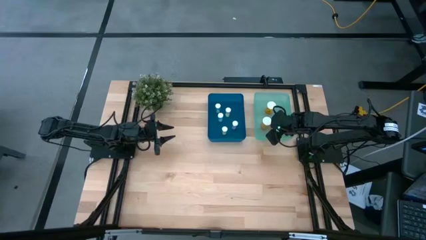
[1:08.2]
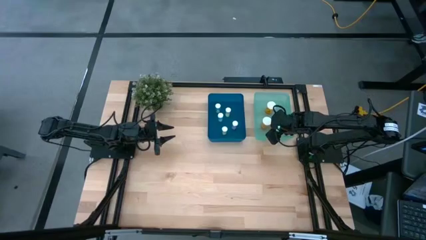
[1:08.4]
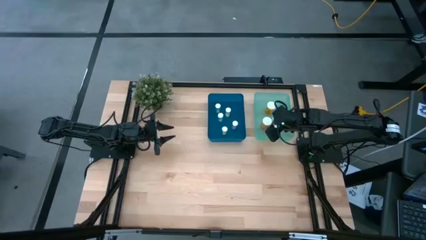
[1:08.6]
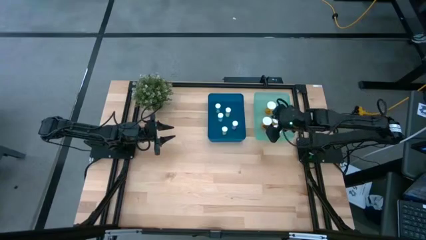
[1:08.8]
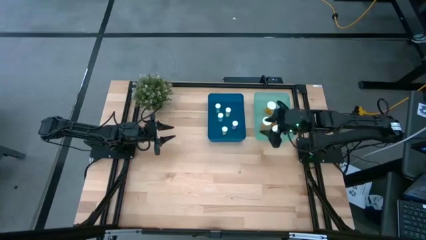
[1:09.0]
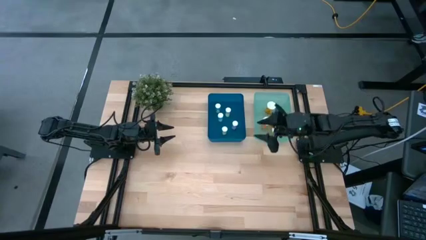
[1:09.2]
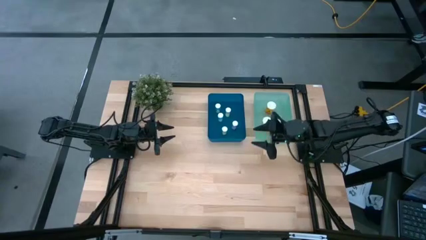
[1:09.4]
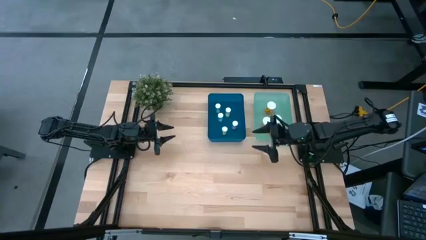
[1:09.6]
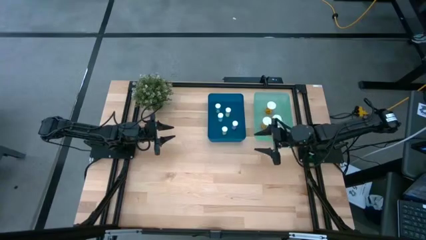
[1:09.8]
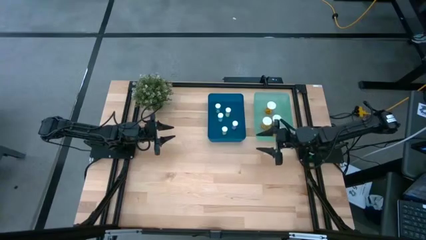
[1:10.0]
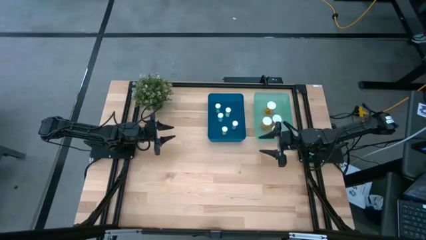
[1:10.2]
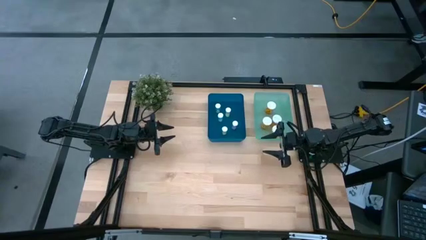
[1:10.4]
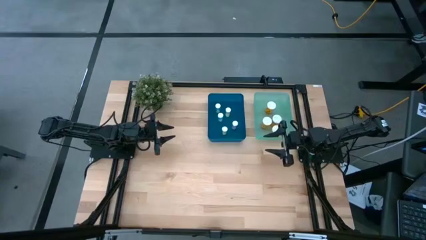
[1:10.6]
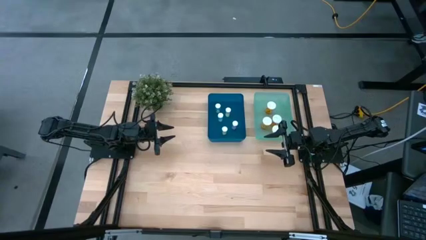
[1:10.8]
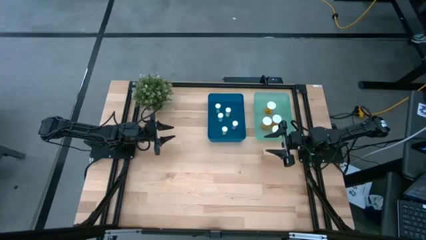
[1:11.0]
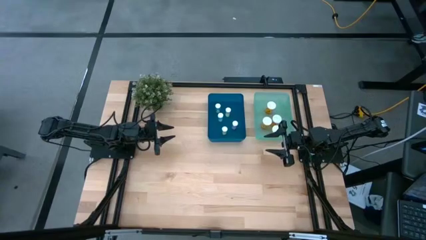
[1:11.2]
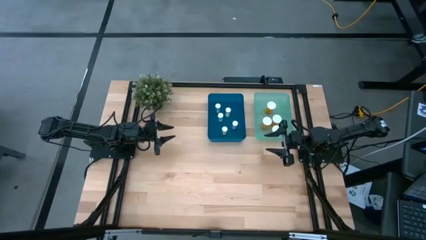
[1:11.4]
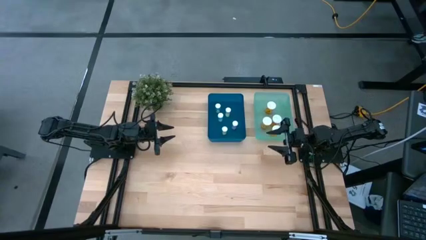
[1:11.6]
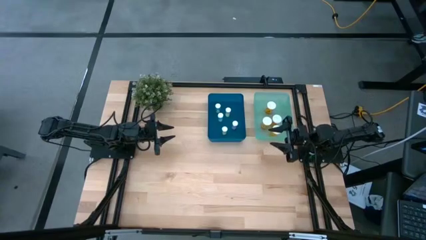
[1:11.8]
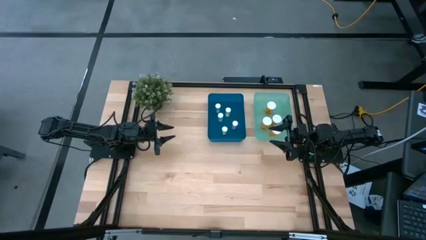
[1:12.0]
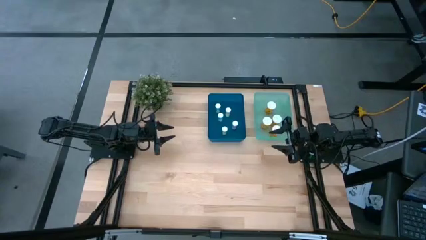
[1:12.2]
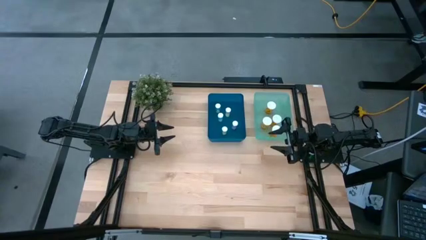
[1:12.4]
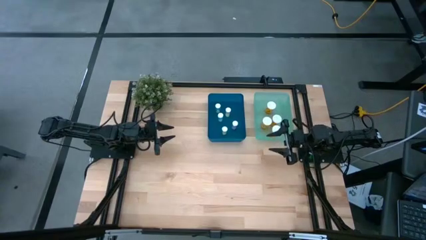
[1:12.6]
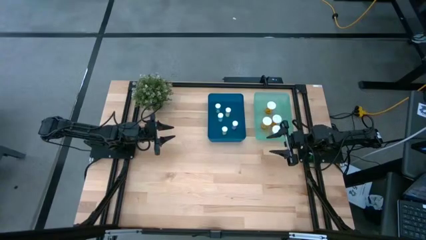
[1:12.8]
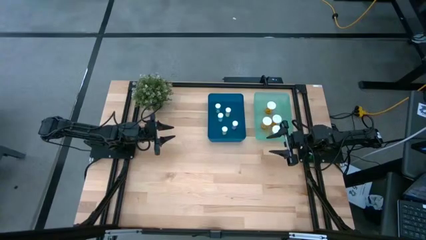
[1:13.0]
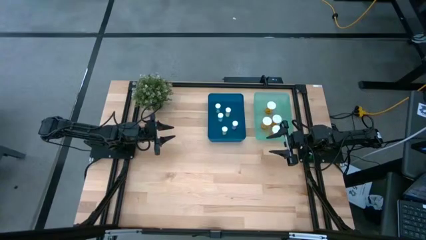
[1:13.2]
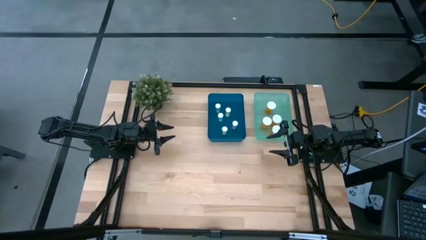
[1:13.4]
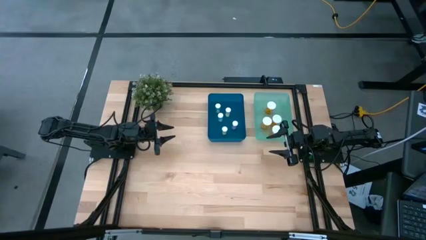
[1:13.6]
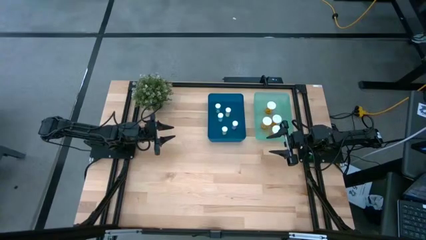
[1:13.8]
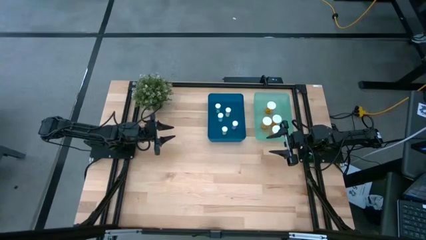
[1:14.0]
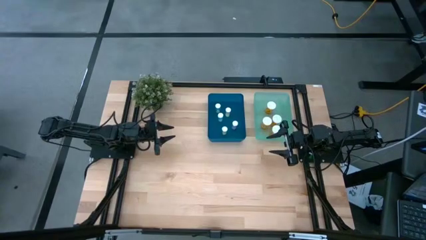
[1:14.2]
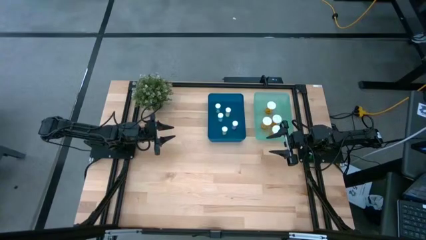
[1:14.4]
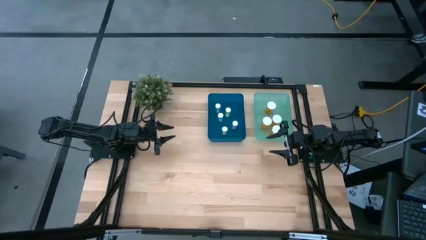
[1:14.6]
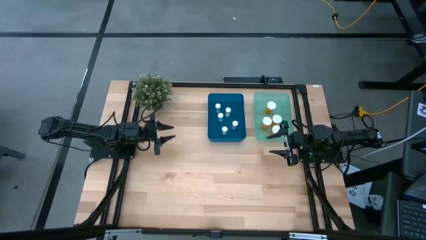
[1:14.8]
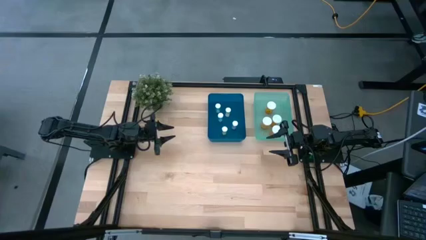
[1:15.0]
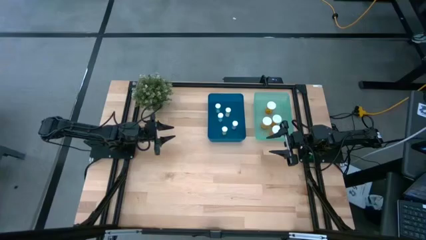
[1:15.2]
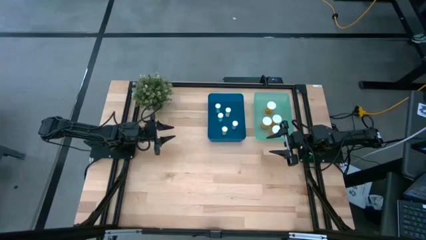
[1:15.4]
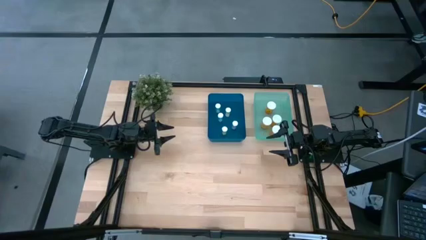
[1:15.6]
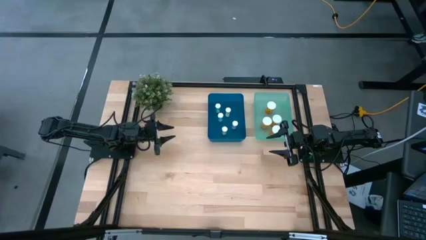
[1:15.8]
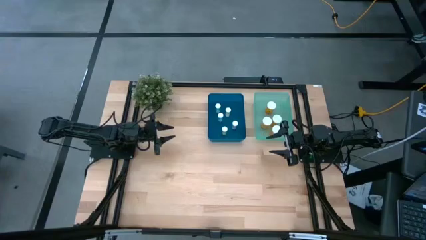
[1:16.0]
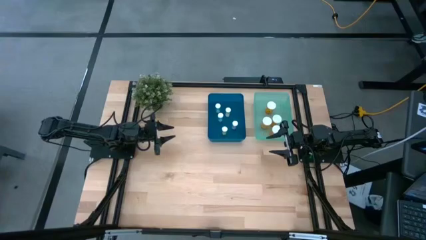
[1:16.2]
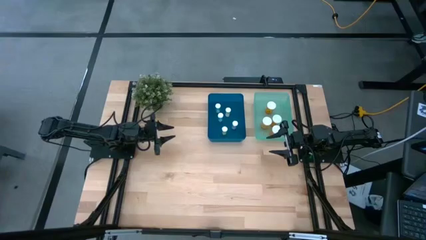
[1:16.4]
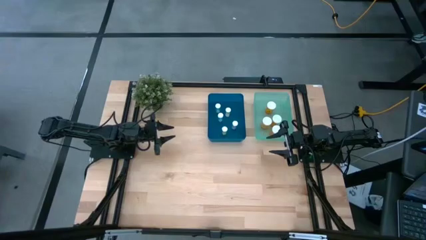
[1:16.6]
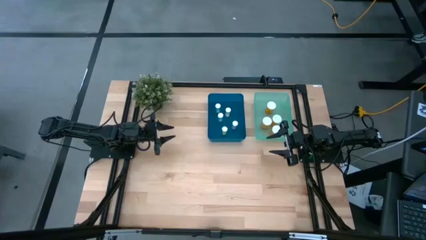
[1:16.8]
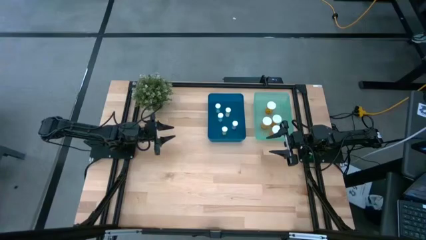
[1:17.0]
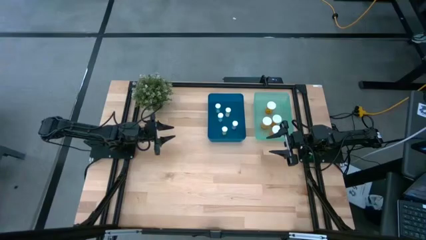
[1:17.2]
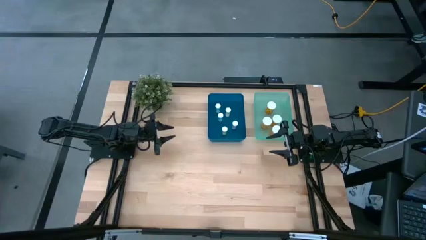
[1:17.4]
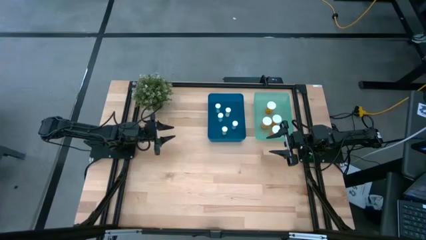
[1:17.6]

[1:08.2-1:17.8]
Task: Pick and place medicine bottles into bin by pill shape (circle, oval)
Return to Home Position

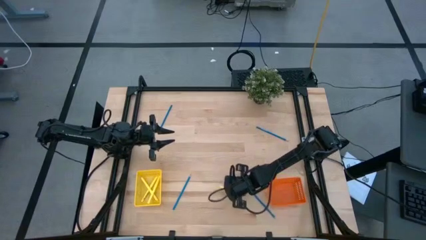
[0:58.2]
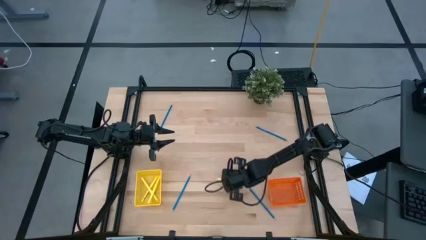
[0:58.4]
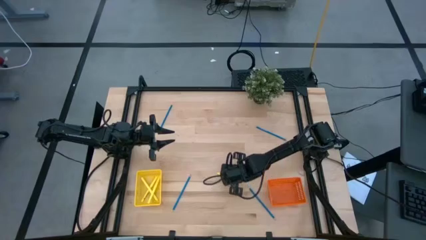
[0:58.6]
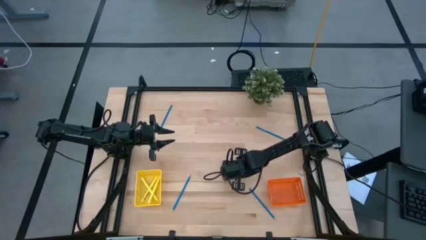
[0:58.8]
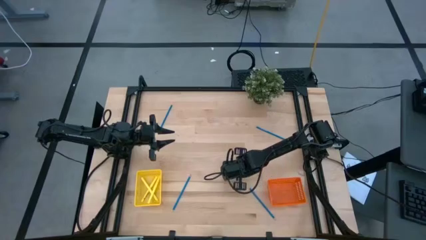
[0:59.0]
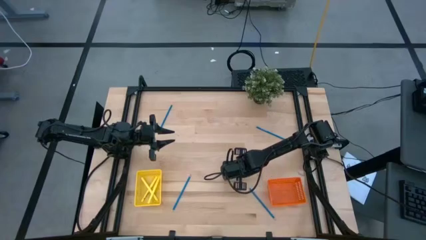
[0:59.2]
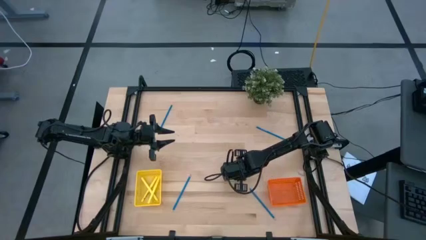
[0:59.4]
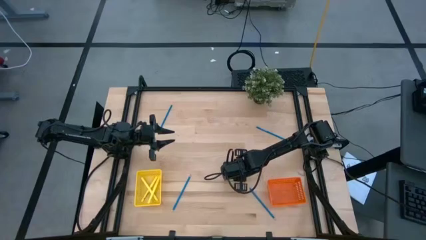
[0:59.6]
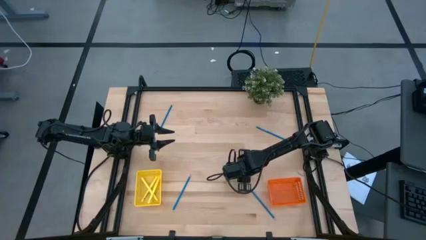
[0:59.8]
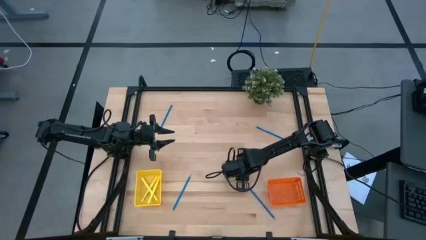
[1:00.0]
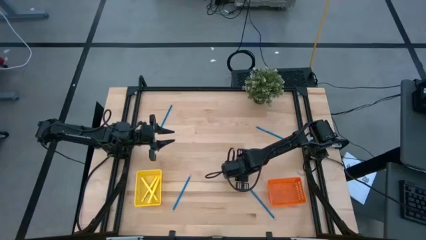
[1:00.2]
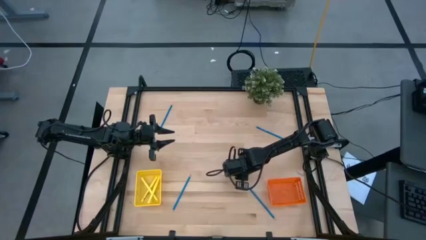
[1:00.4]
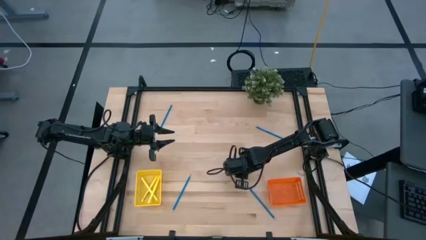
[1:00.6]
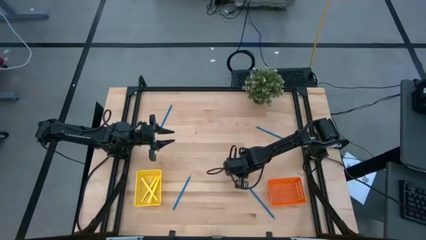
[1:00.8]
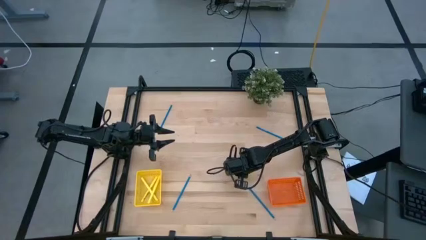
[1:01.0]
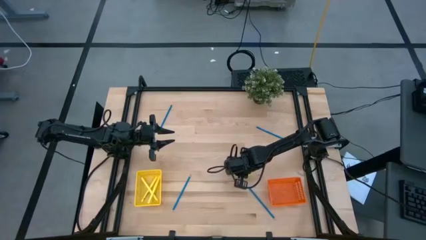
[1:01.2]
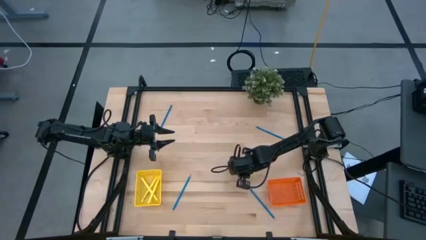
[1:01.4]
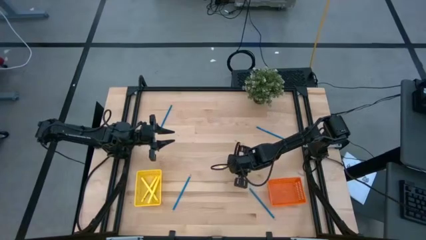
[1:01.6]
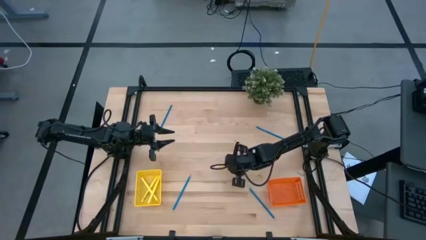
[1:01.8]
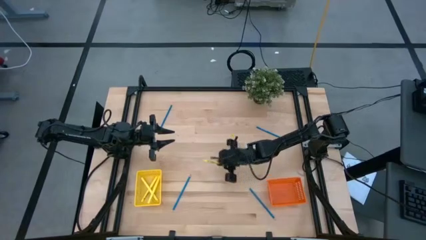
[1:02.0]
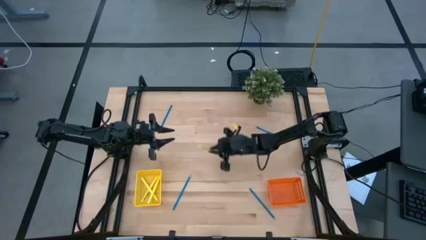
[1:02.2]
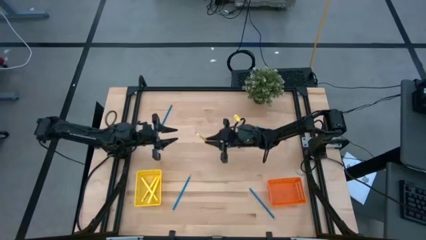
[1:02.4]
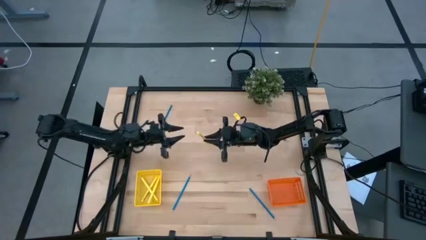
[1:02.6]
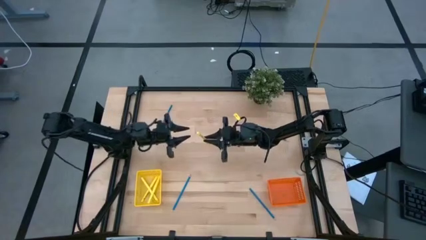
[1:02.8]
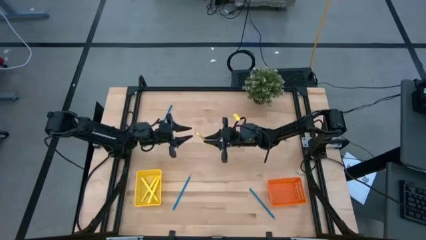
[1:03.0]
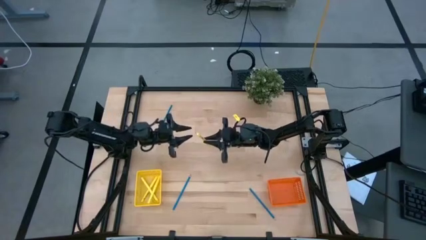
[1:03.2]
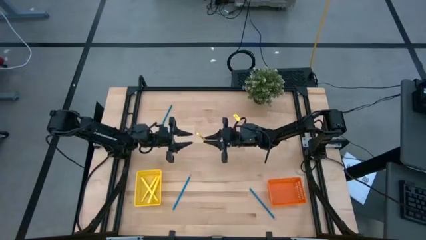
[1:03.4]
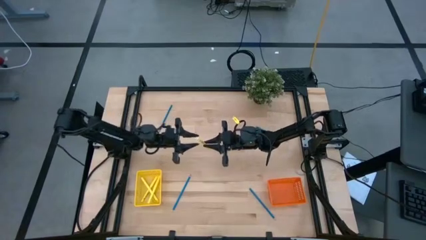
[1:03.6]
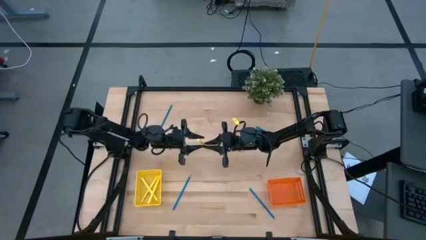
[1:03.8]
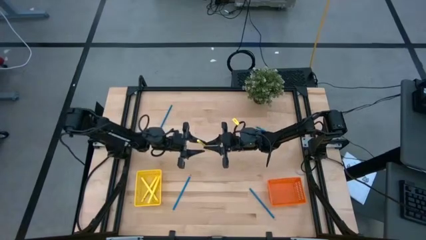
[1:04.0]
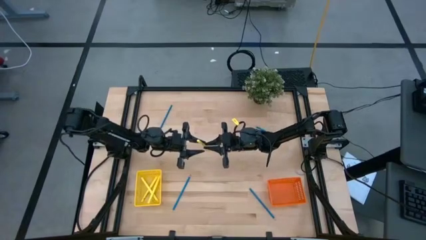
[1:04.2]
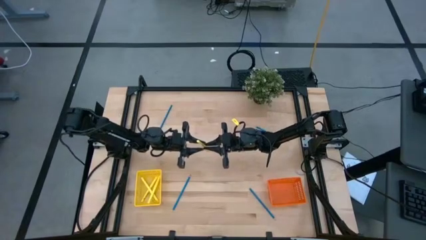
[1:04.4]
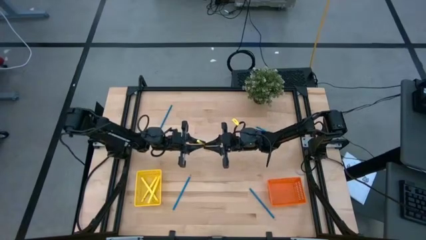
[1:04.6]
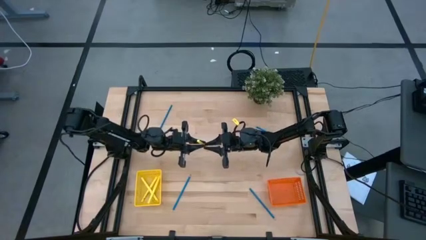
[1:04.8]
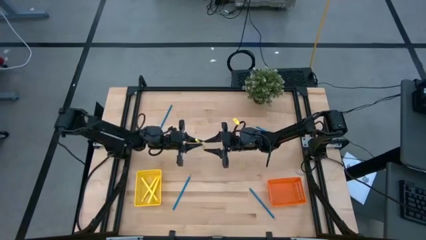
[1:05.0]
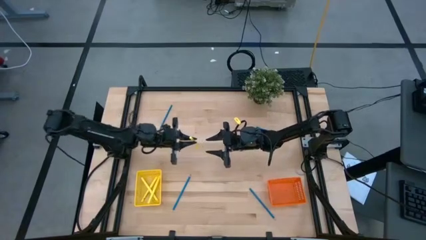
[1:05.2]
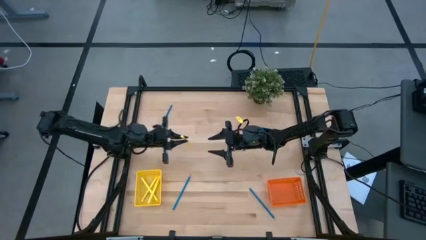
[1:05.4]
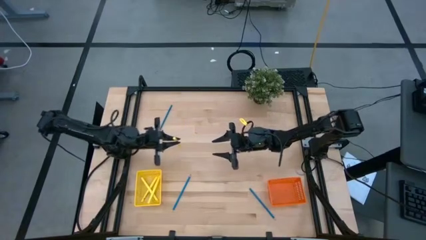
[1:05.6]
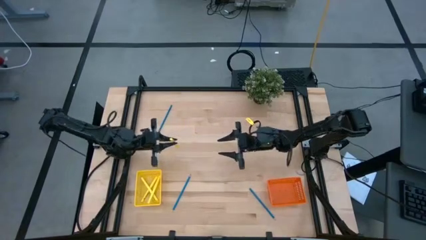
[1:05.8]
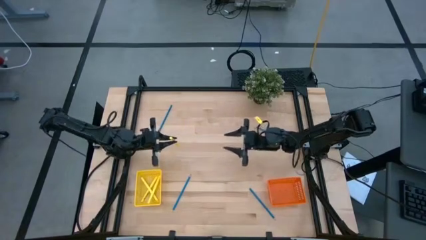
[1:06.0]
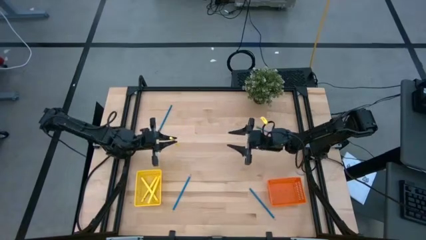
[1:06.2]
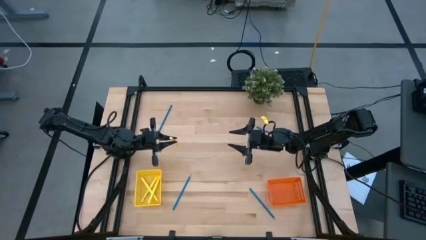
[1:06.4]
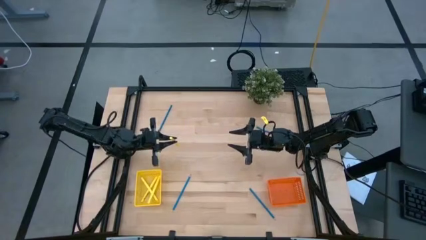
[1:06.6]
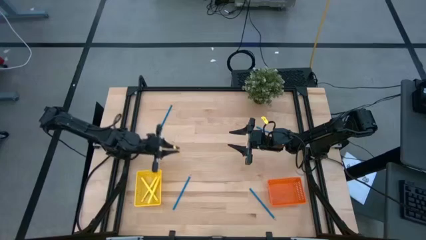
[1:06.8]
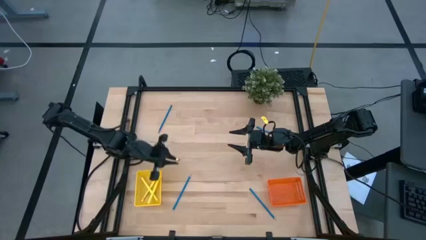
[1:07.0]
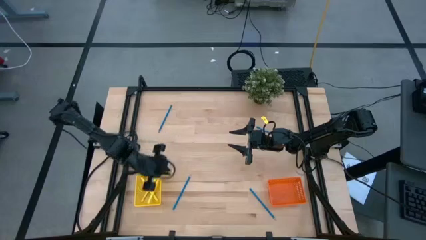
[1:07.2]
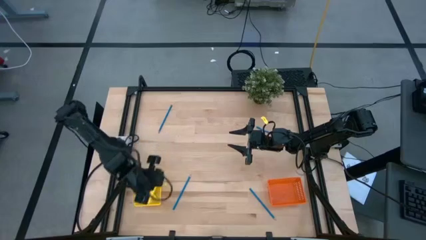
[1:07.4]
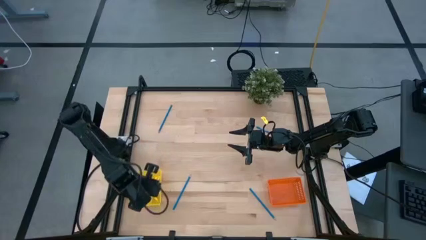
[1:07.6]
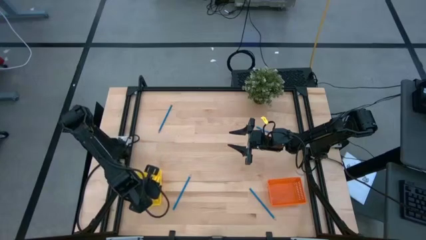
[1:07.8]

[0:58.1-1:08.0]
Task: Sort pens & pencils
Put the yellow pen into the yellow bin
